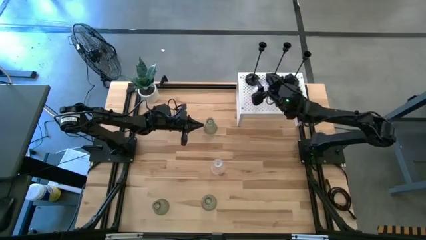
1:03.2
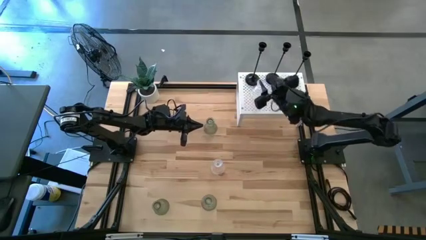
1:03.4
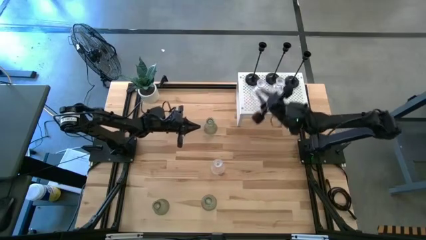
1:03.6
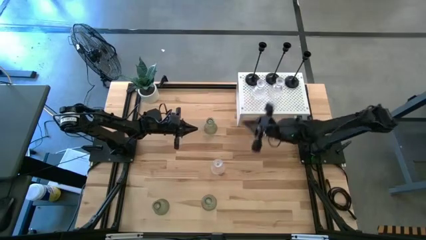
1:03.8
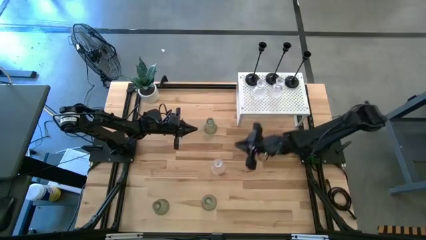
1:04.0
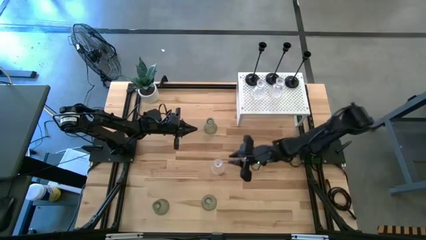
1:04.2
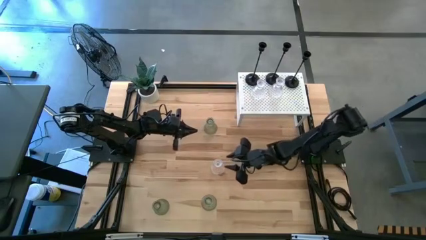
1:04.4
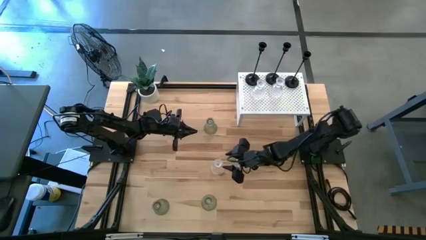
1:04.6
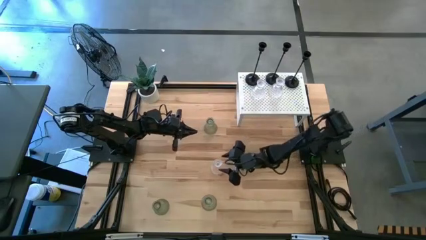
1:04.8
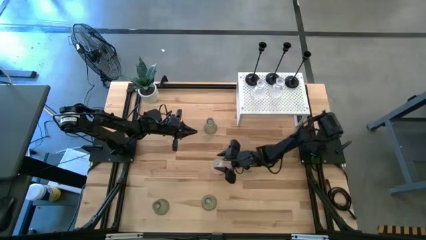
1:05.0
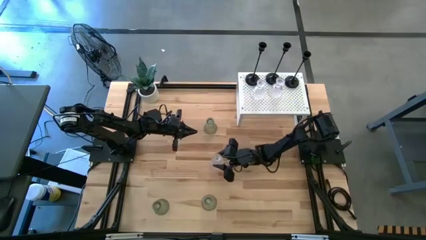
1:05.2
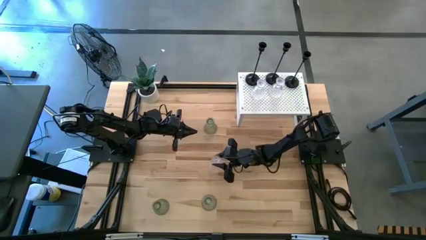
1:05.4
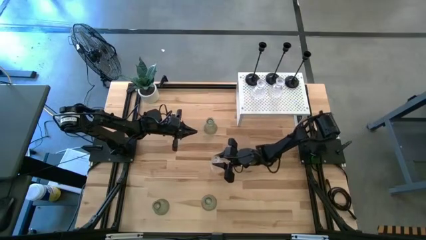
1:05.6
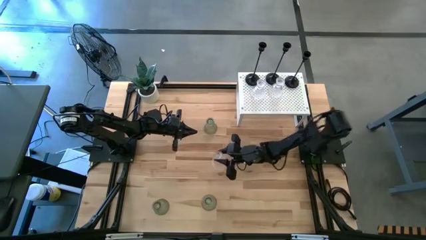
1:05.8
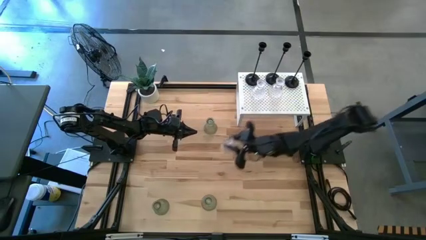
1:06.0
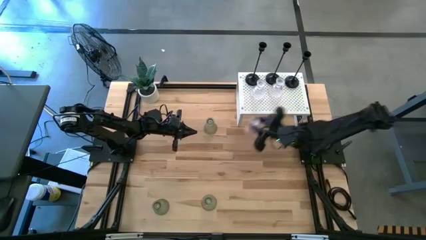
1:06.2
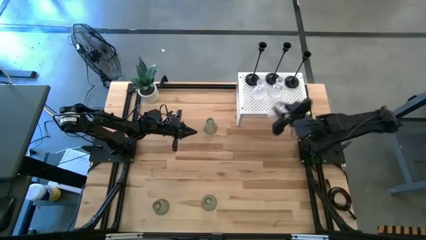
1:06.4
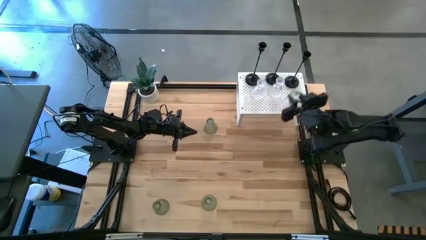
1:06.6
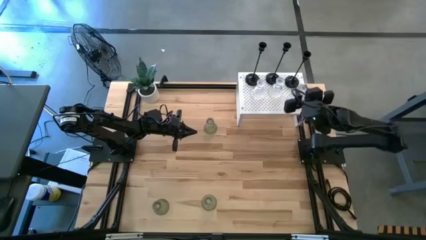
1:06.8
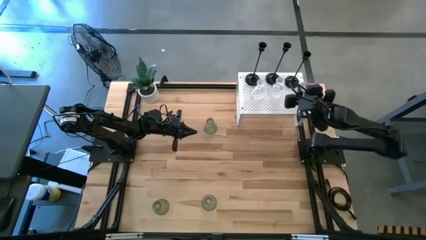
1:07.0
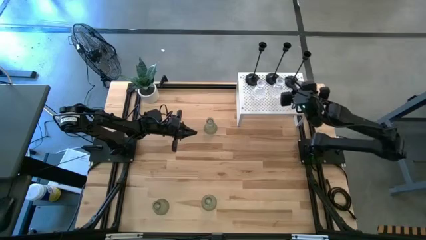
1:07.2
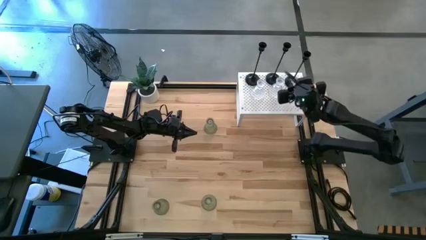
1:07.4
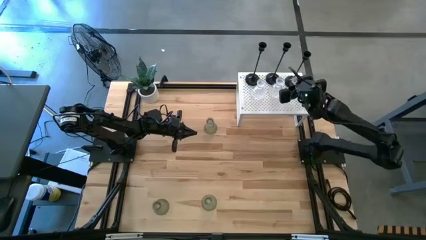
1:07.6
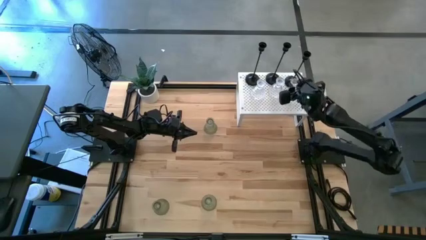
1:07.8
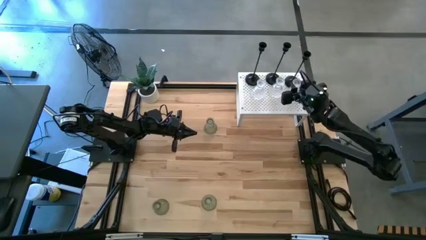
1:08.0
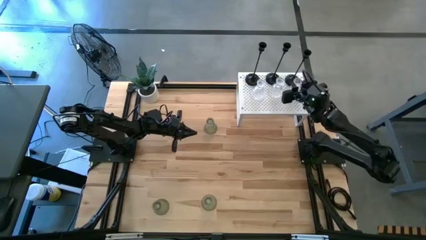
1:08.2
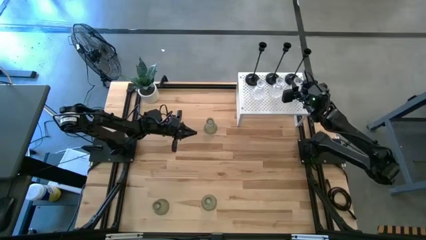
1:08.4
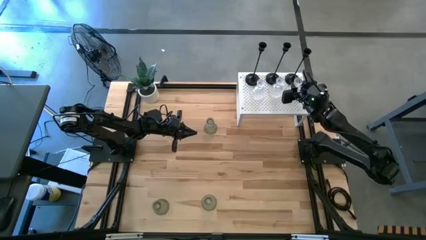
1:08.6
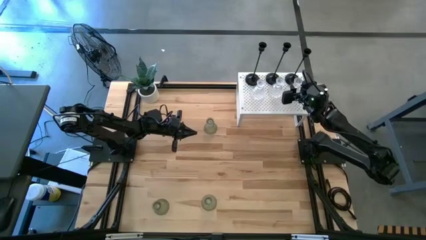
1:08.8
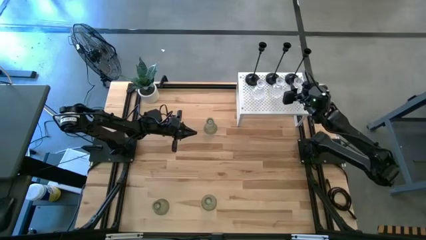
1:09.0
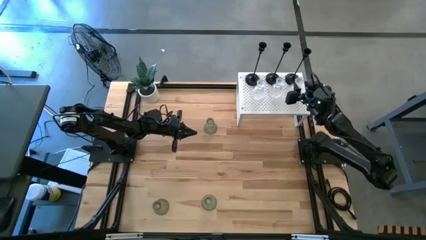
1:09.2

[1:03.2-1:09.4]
Task: Pick & Place candle stick holders
Put the transparent glass candle holder on the shelf aligned with the other transparent glass candle holder

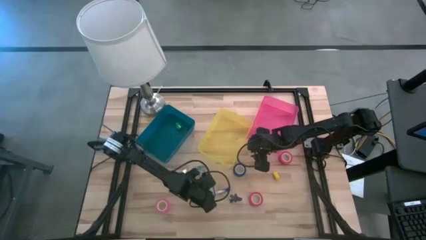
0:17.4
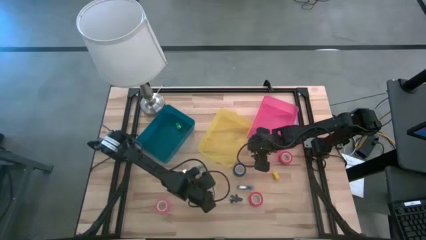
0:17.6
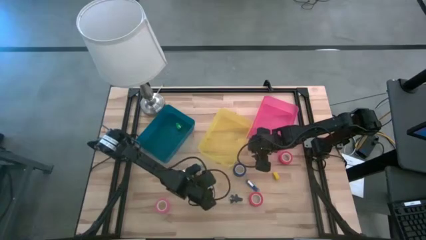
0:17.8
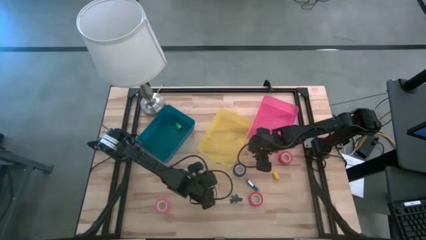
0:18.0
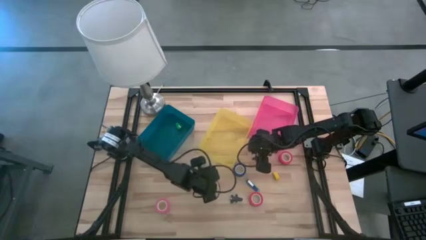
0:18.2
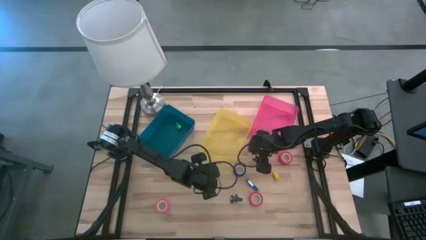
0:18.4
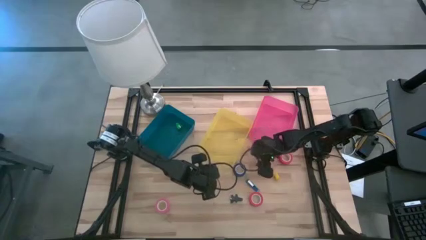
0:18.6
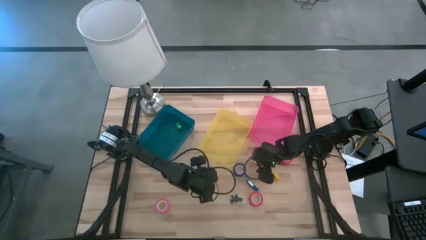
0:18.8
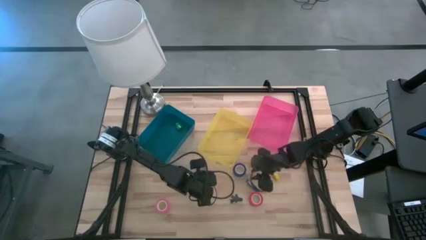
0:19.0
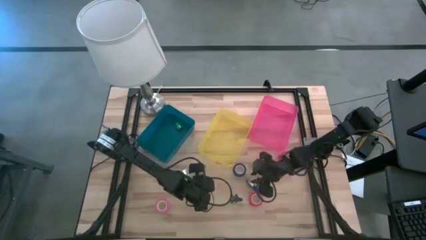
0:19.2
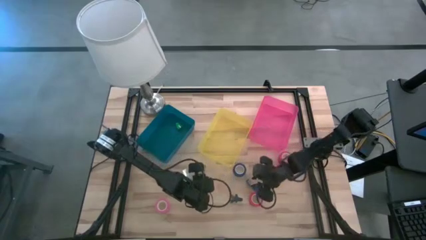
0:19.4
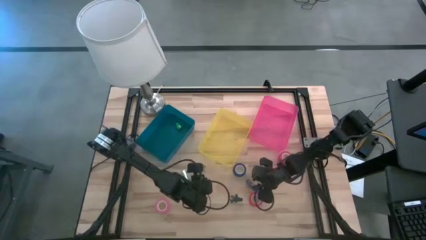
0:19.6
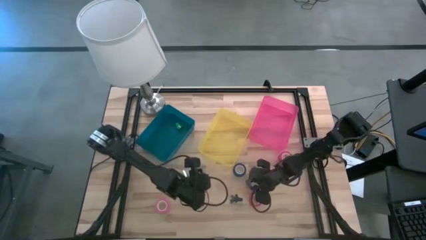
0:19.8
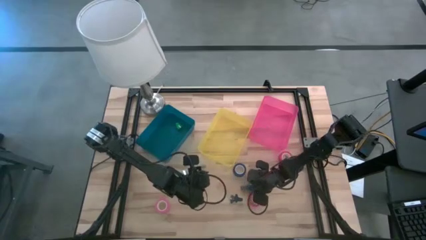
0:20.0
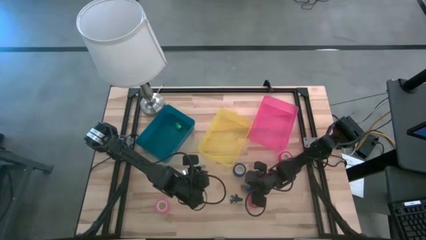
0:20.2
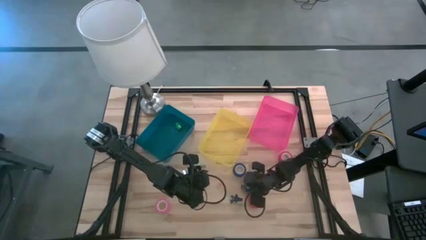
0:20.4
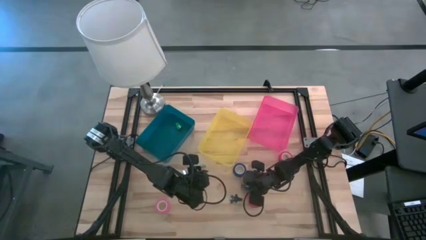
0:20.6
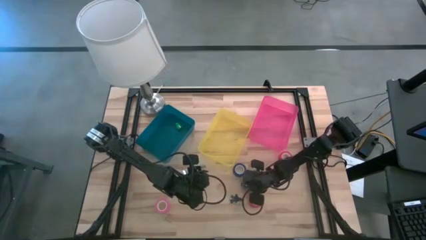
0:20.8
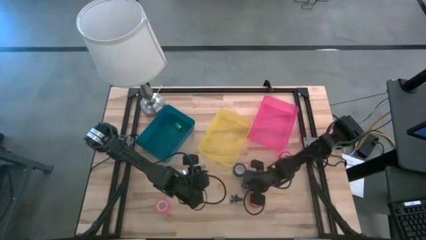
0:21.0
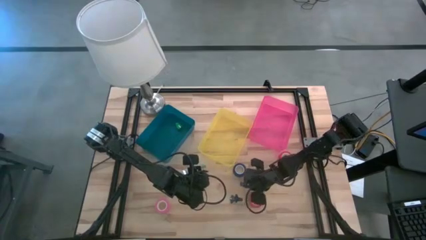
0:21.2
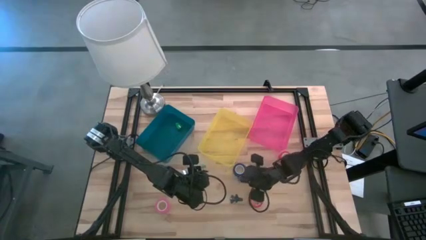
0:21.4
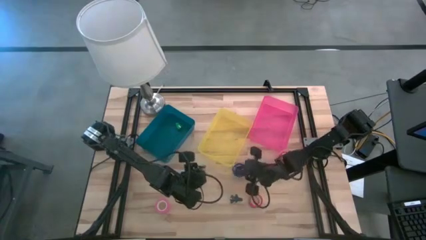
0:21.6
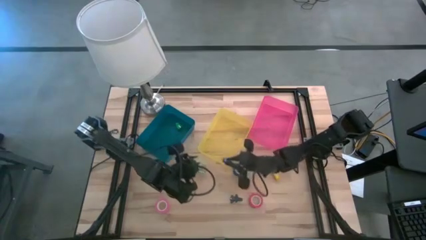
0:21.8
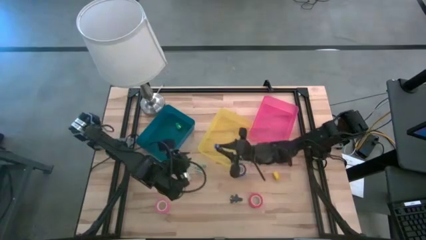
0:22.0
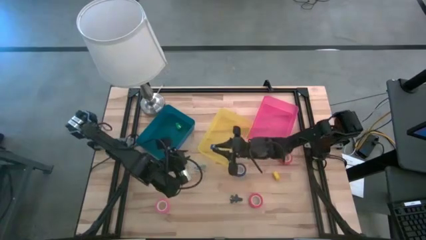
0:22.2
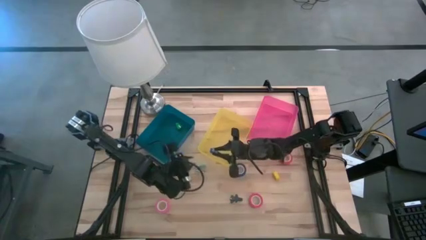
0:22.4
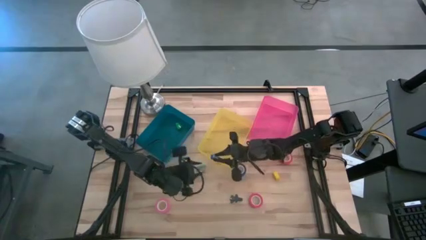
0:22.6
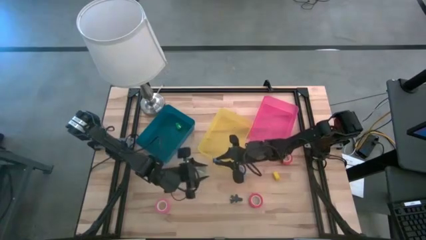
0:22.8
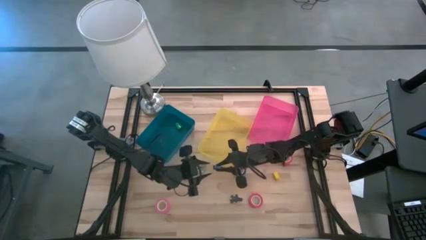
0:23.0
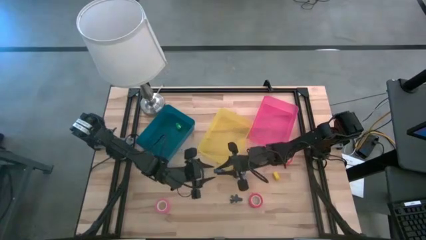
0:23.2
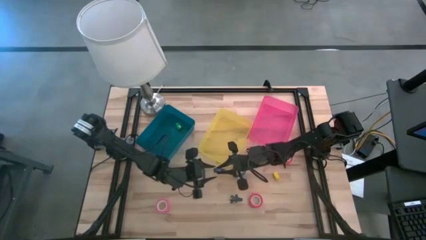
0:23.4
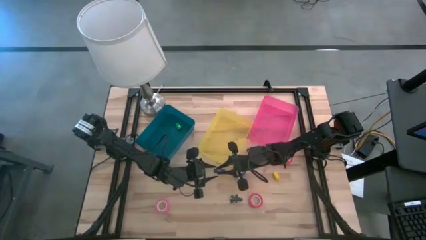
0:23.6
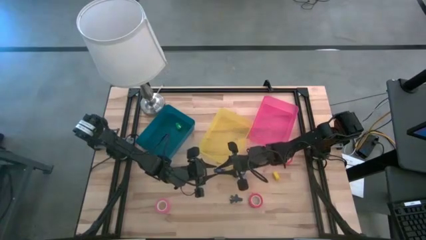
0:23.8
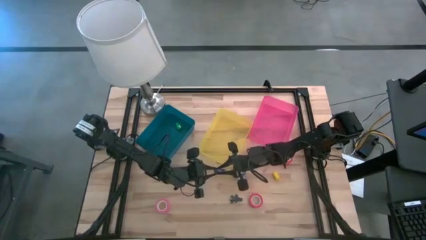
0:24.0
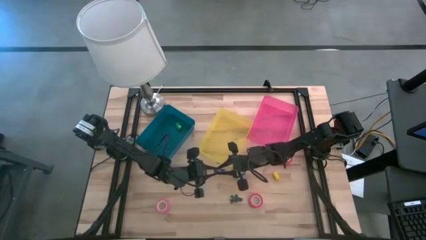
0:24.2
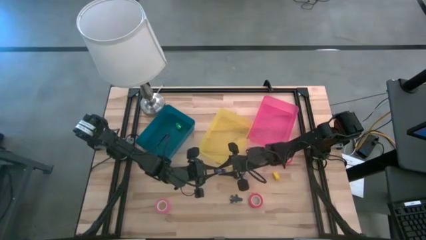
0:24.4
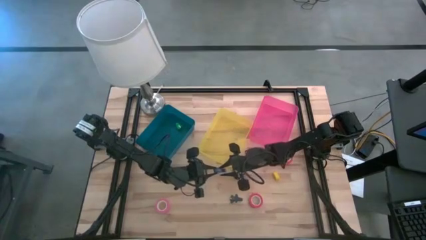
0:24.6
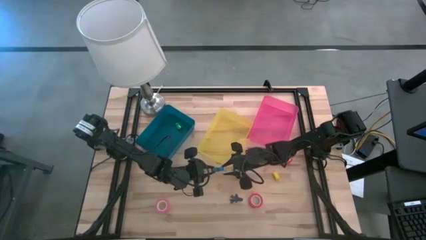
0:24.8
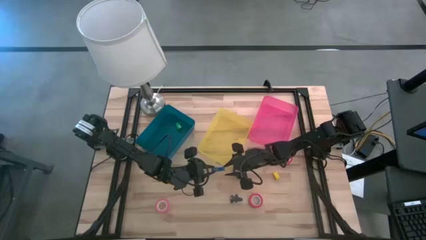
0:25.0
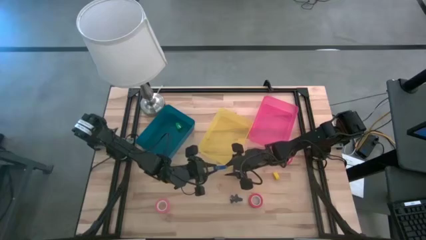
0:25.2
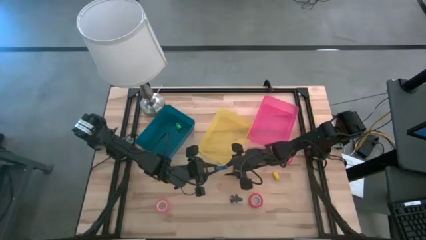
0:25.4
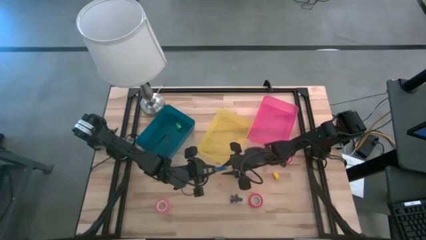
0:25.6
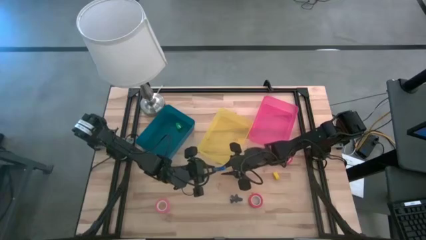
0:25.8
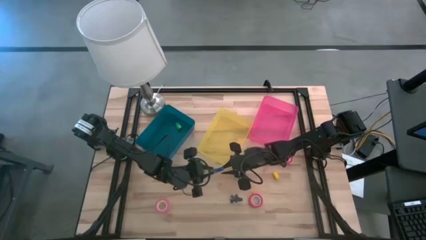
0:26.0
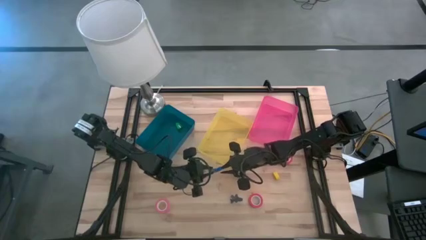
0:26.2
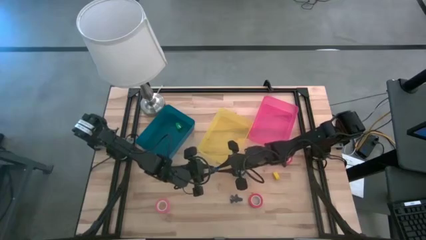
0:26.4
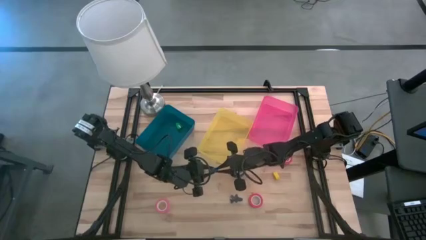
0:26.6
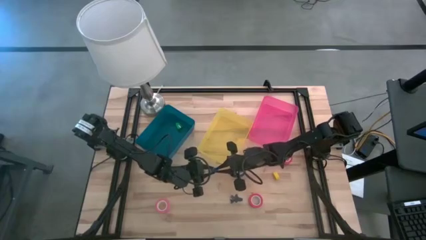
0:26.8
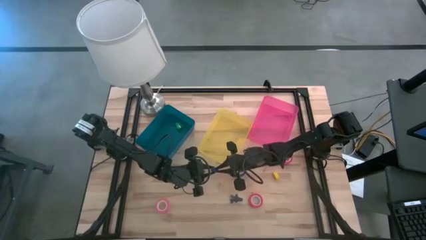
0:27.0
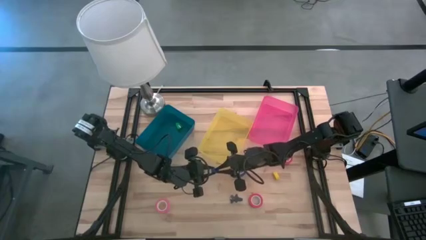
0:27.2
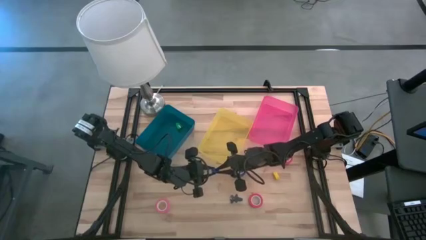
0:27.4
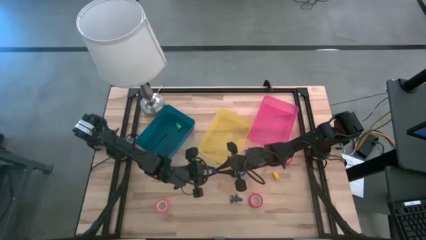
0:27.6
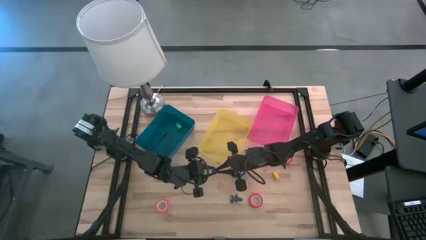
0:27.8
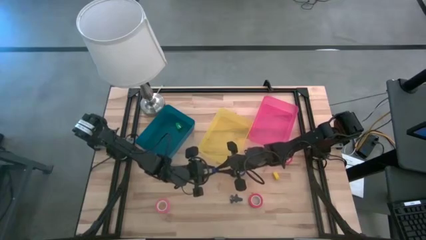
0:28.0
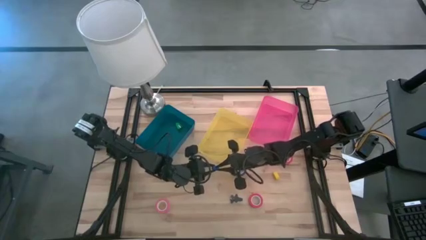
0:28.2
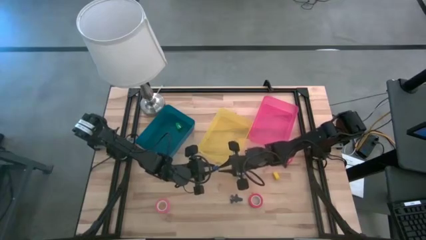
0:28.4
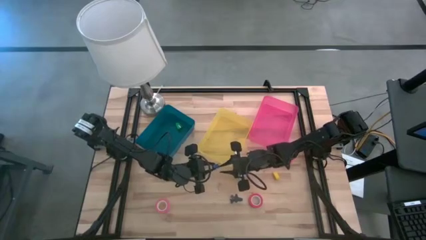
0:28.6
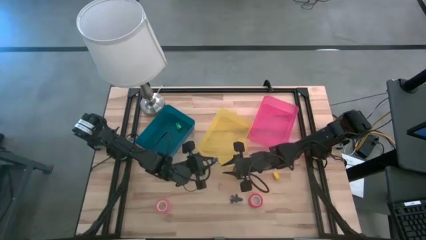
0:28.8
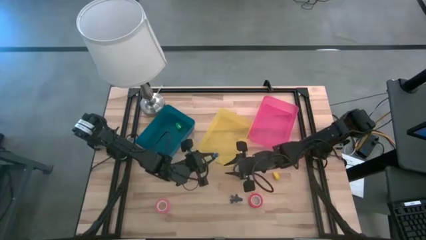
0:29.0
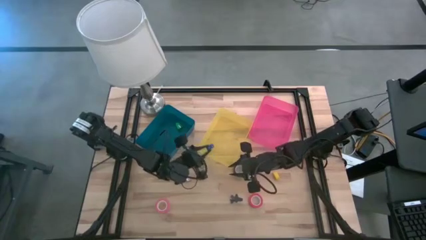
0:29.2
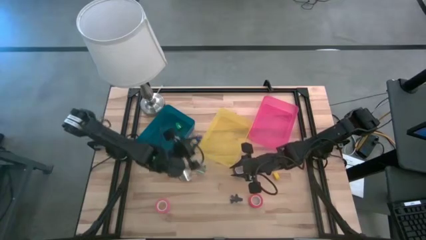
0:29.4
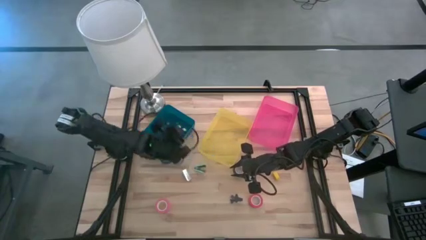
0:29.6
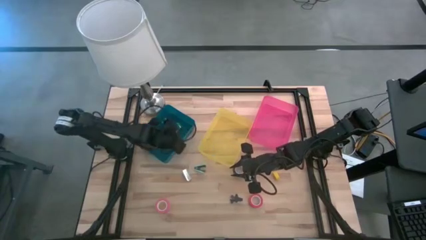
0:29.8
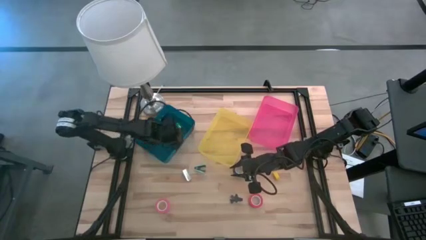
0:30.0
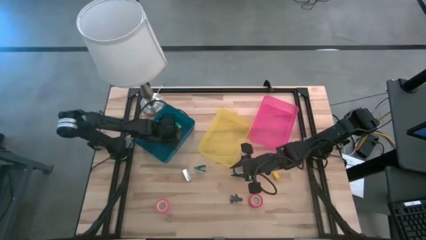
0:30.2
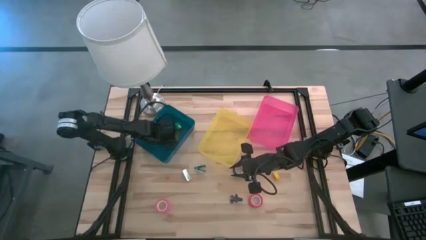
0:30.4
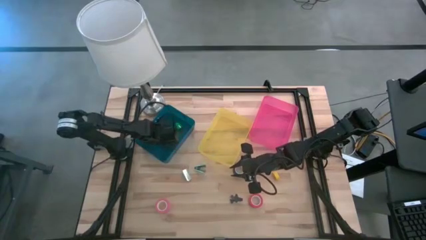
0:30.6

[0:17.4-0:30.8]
Task: Pick and place Stapler, Stapler remover, tape
Put the blue stapler into the blue bin
